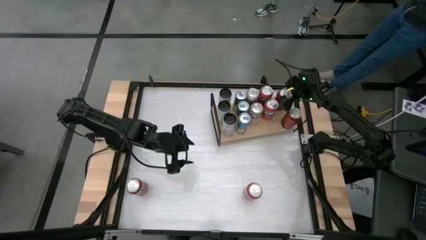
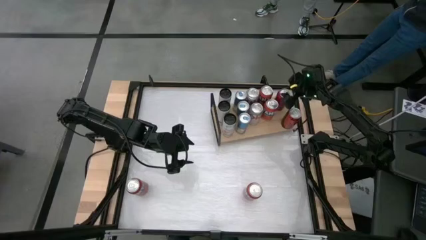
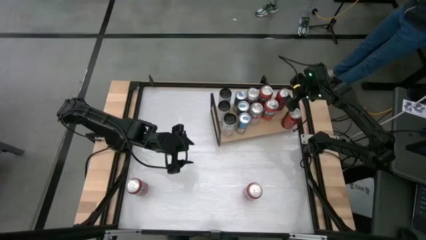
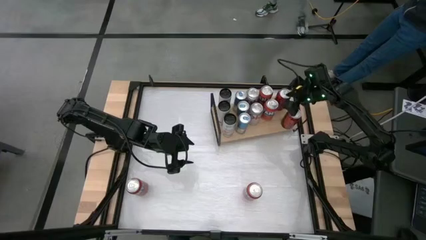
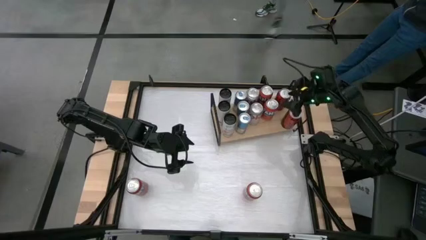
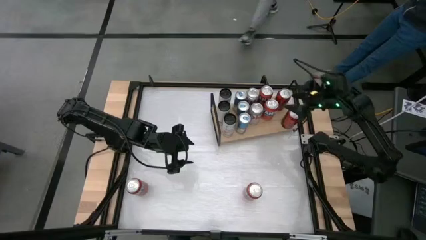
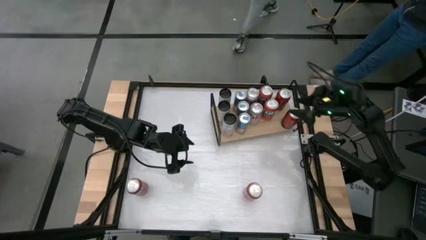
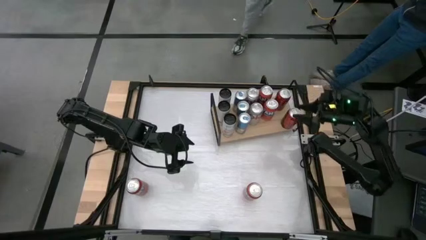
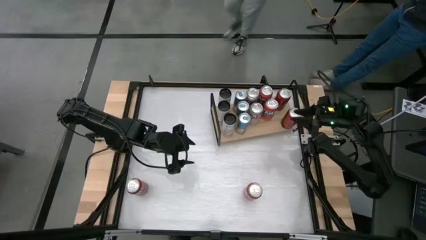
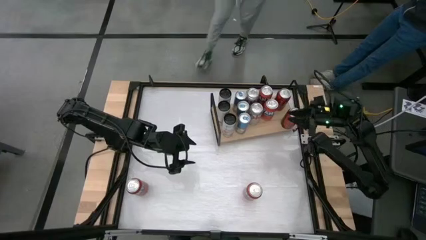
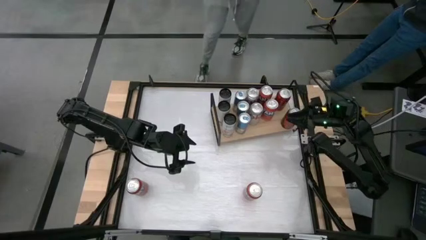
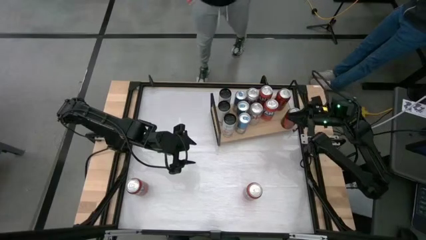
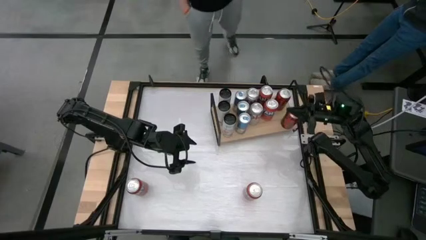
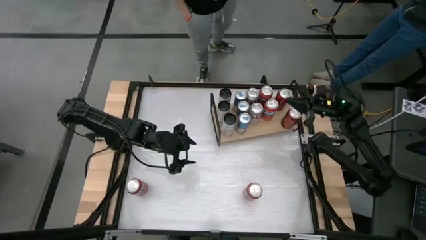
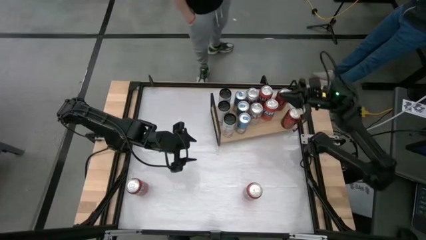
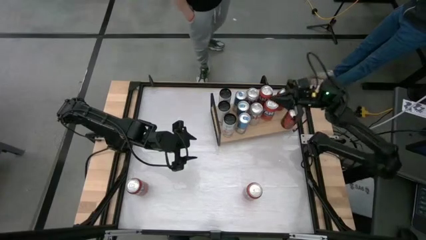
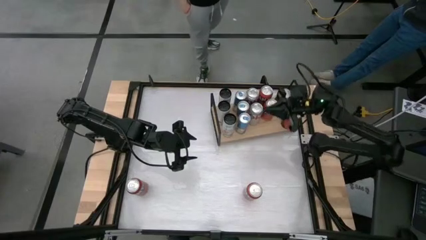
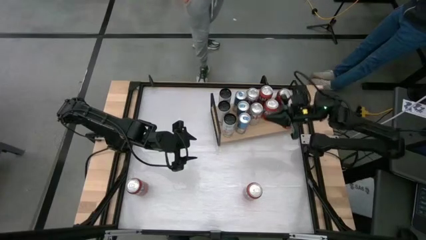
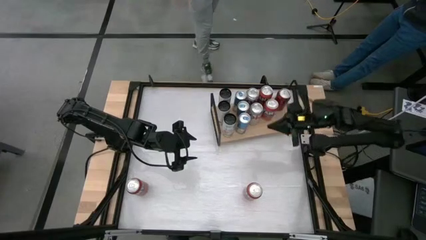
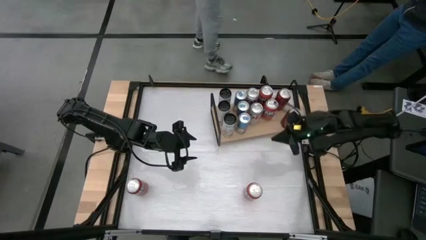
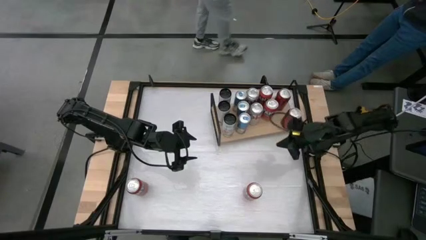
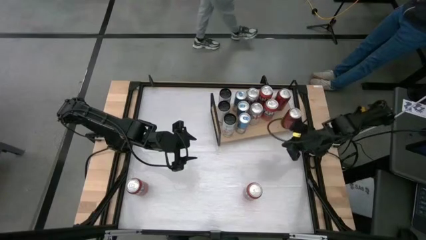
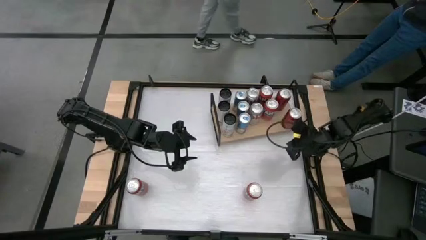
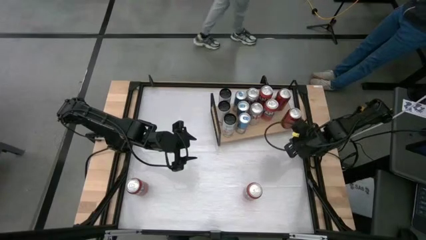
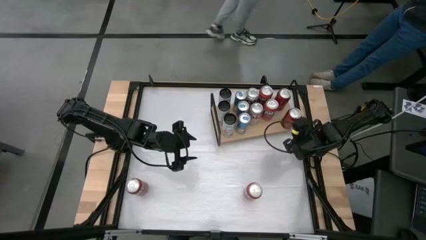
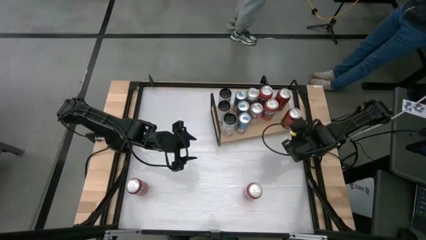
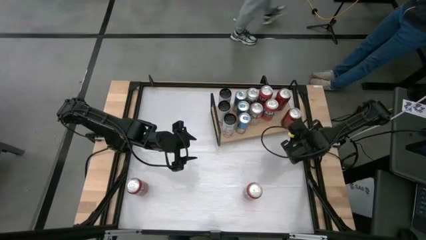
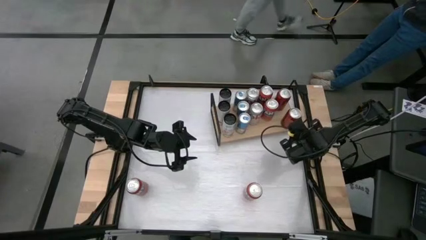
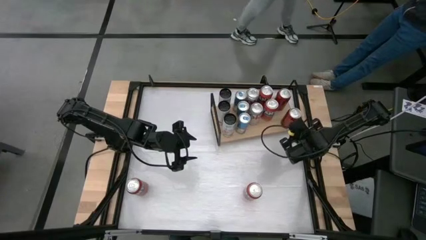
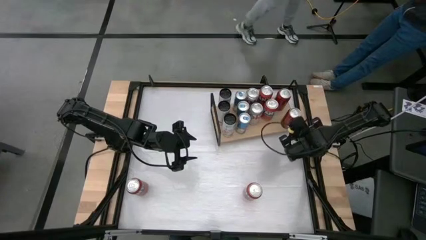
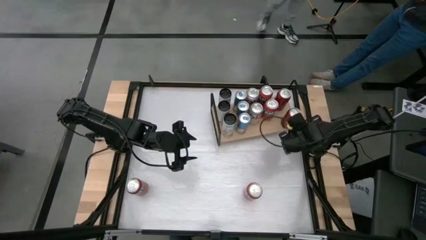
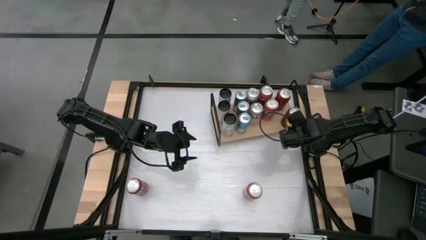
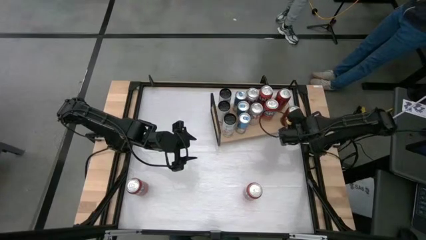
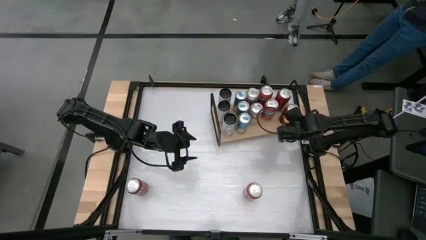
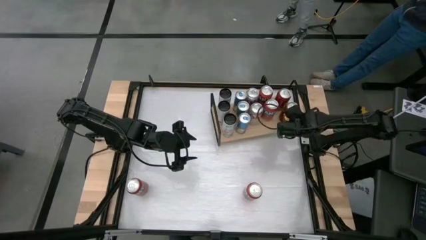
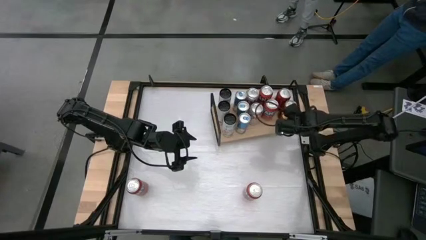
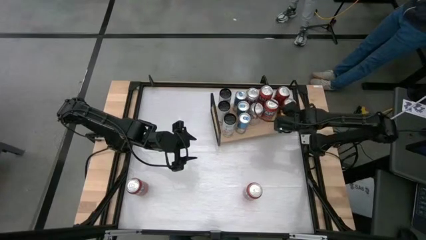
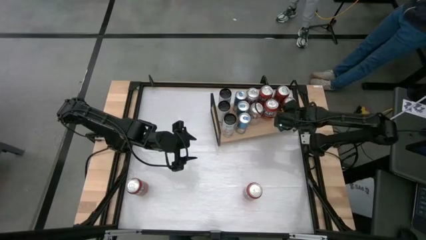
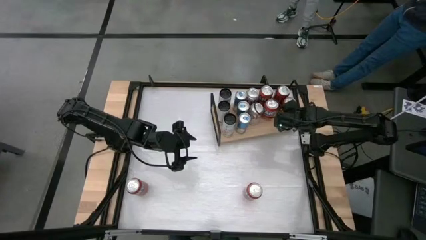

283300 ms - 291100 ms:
Task: Place canned beverage on shelf
Adjust the red soda can on the shelf

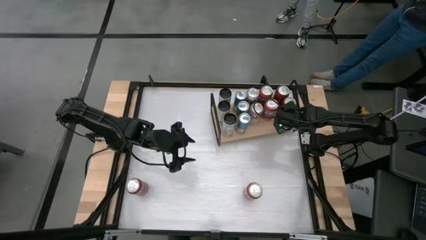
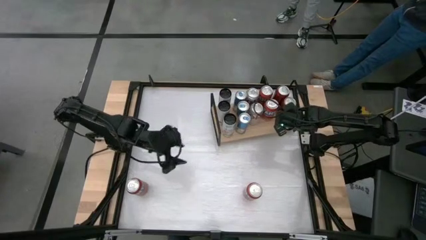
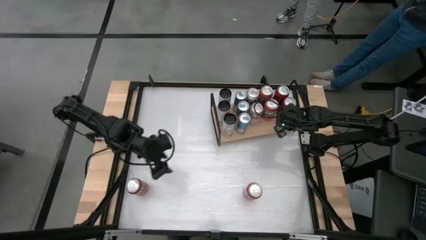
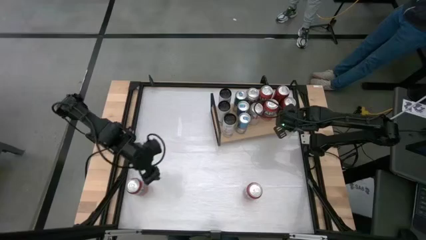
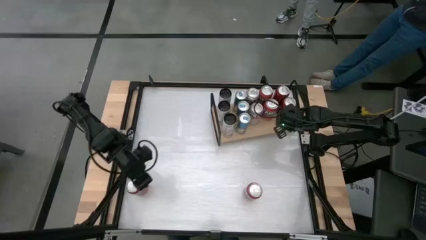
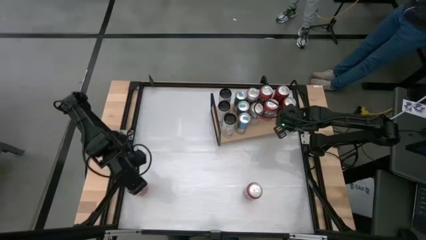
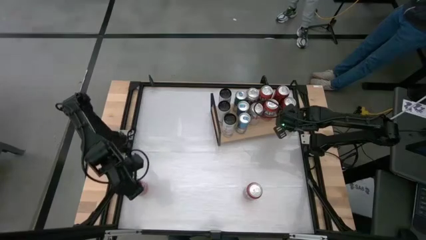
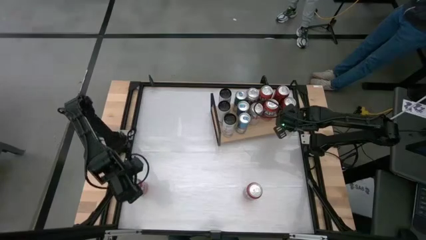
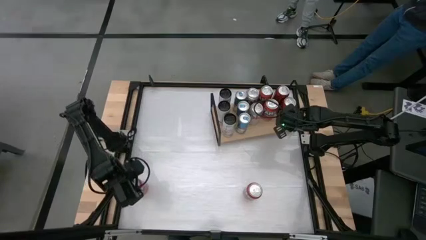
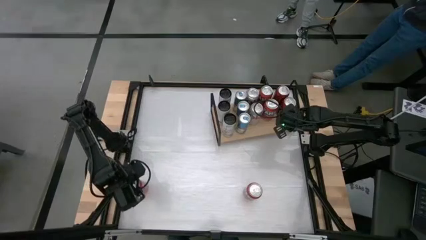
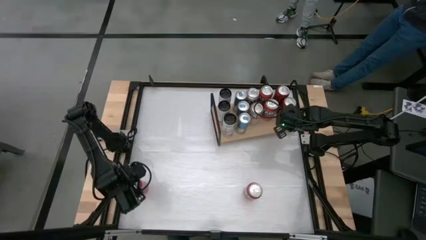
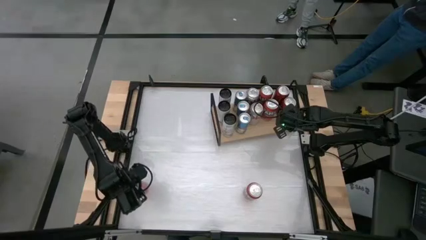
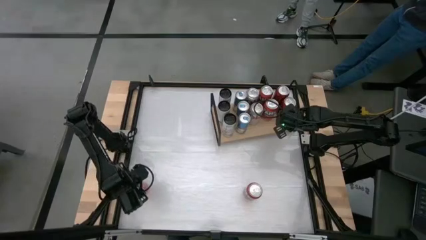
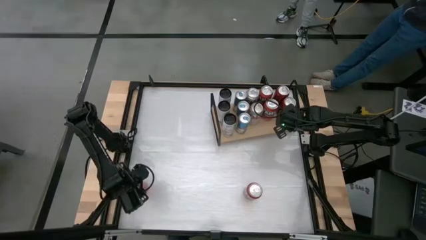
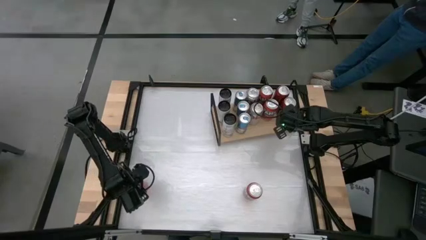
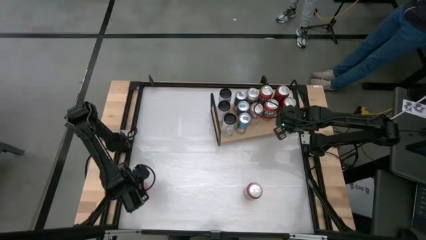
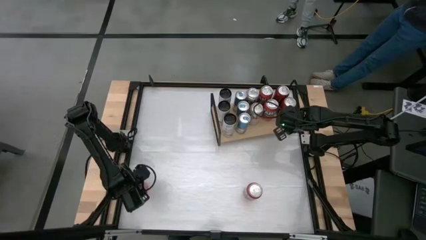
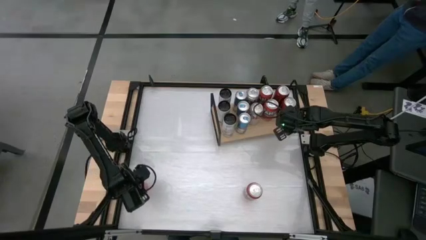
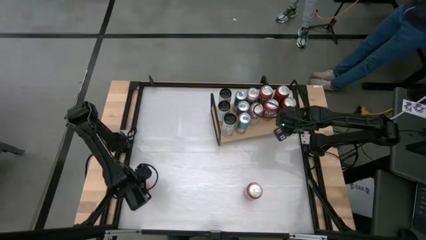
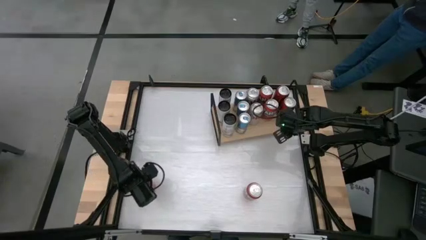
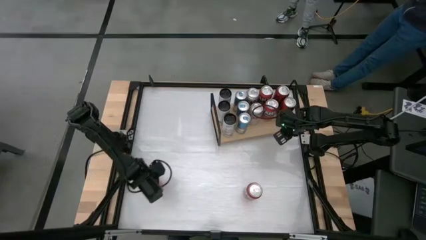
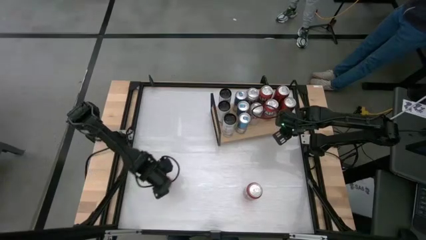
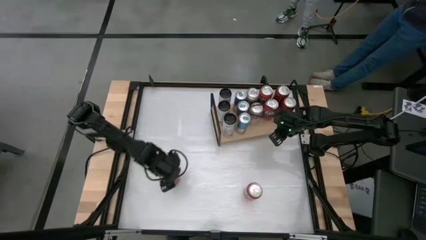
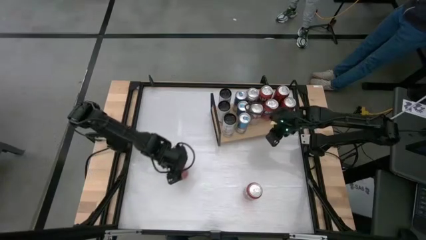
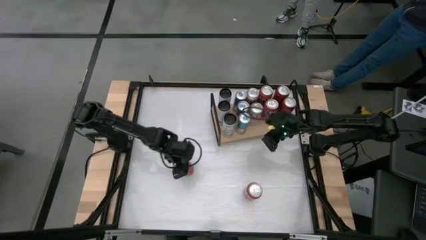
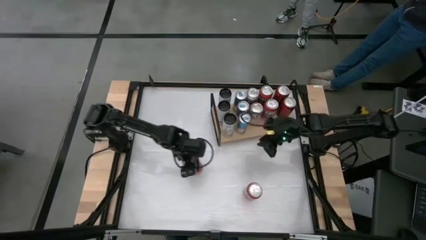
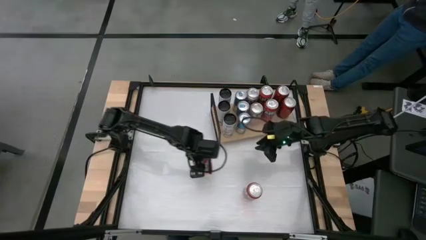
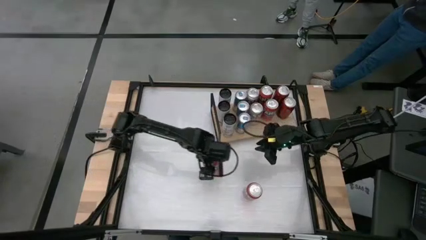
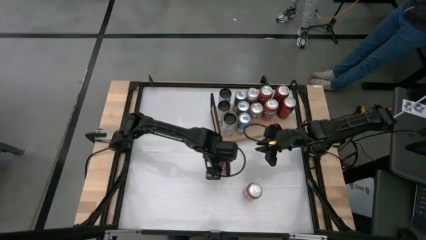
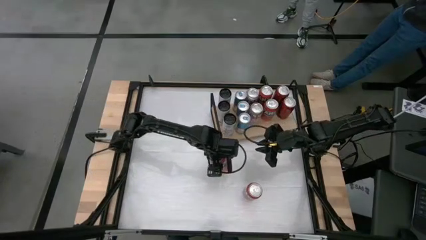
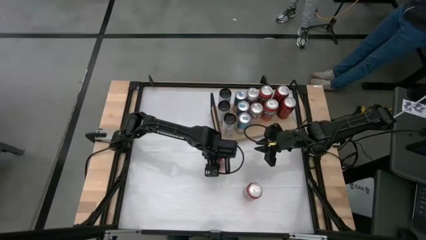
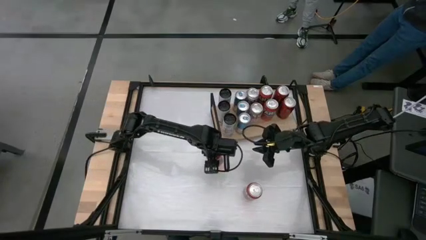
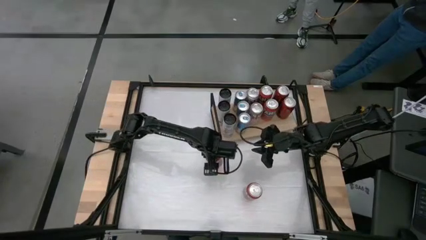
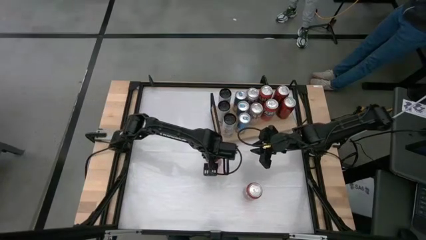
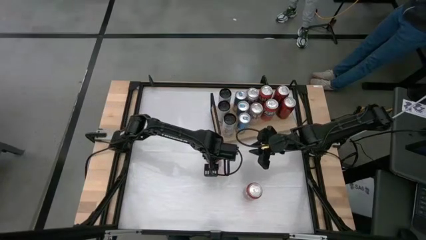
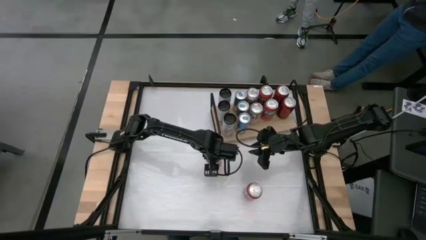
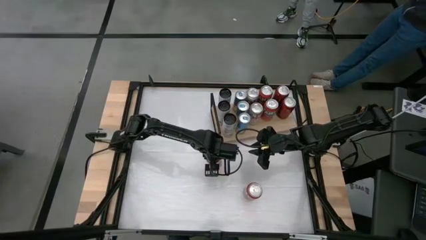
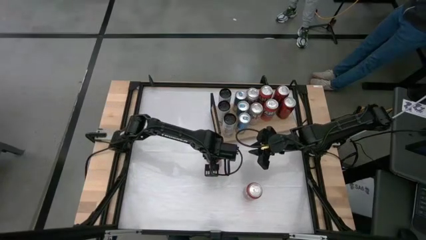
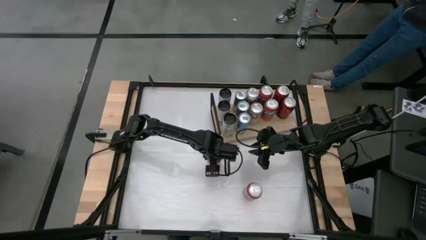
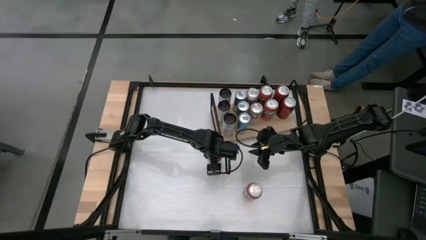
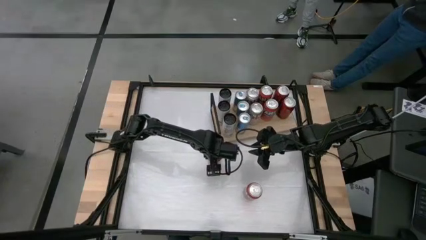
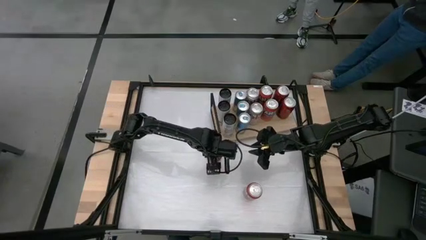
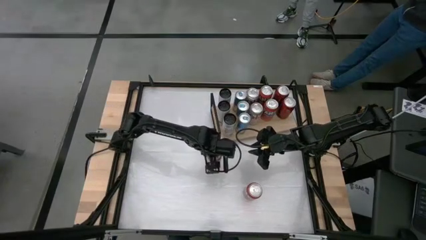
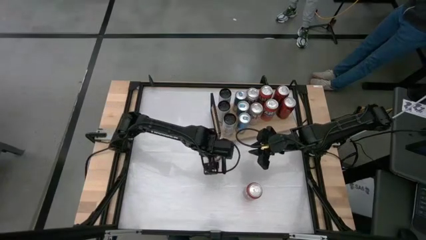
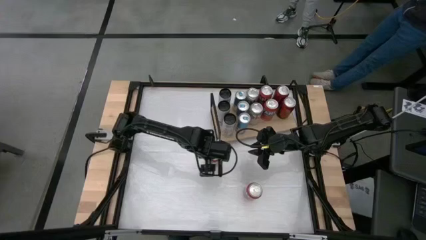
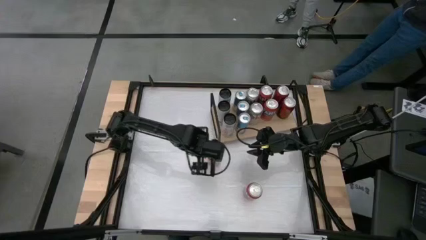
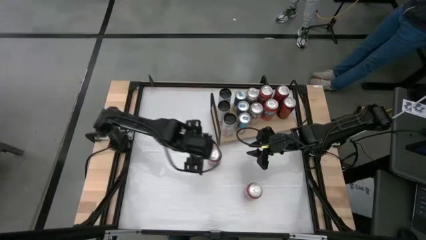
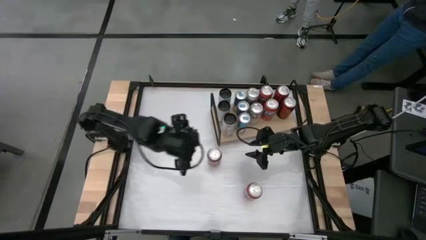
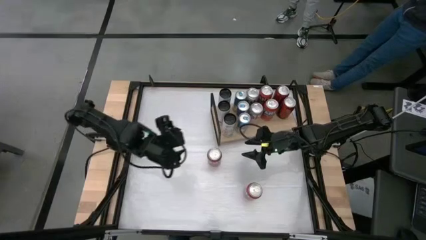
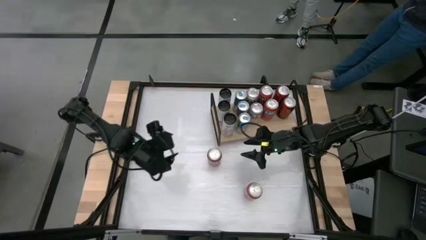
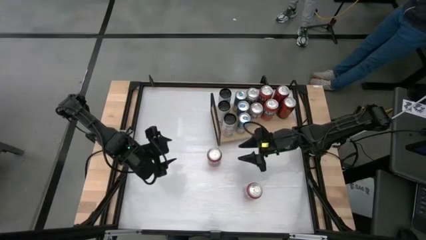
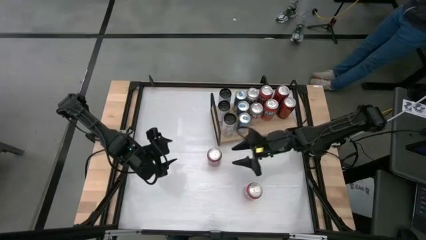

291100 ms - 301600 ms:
Put the orange soda can on the shelf aligned with the other orange soda can
